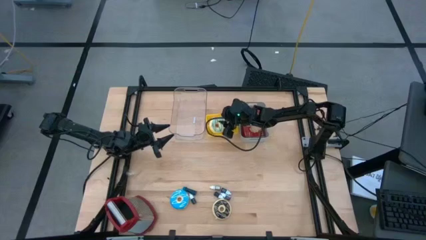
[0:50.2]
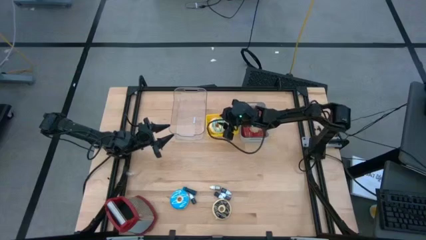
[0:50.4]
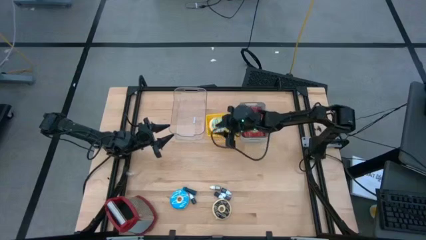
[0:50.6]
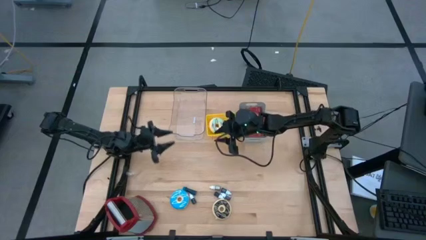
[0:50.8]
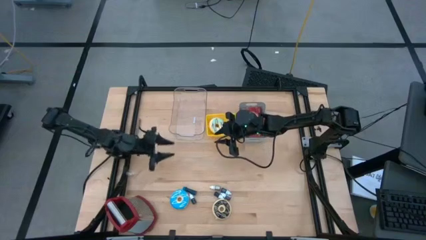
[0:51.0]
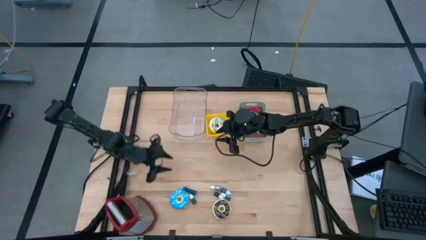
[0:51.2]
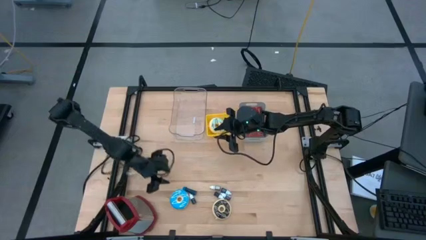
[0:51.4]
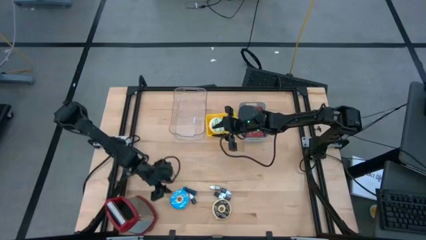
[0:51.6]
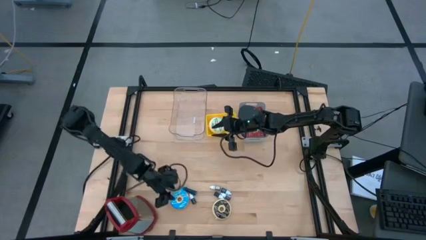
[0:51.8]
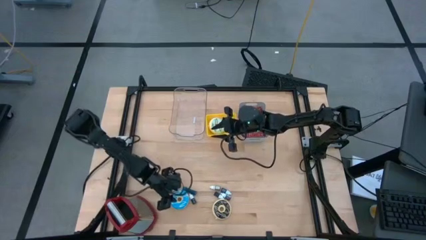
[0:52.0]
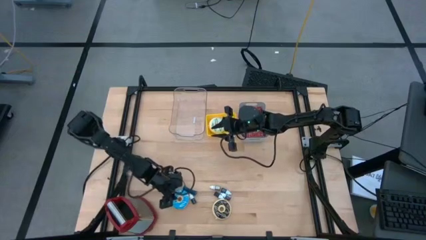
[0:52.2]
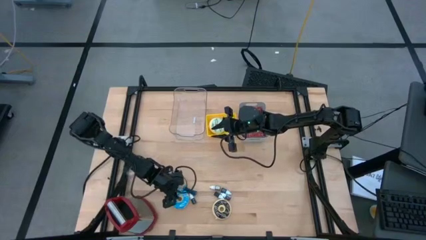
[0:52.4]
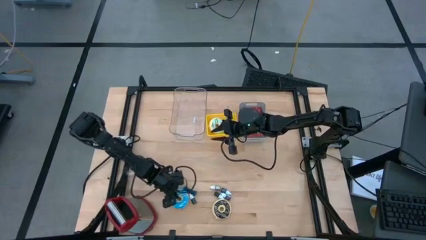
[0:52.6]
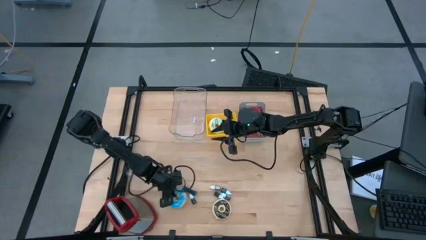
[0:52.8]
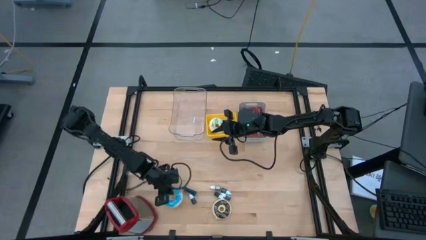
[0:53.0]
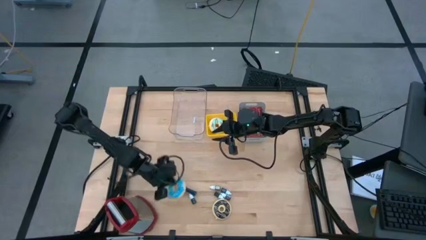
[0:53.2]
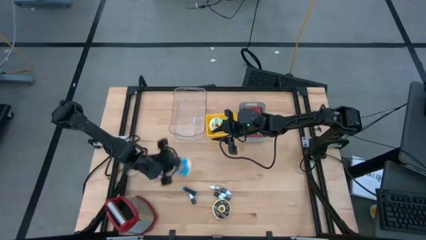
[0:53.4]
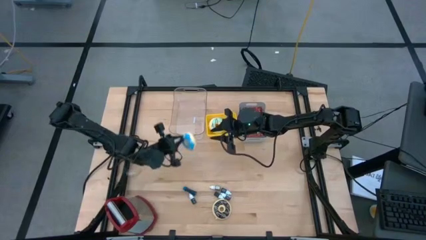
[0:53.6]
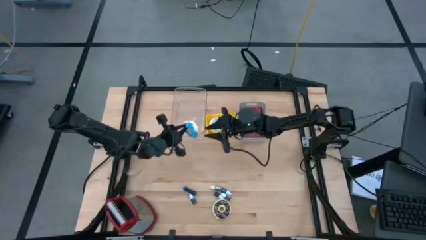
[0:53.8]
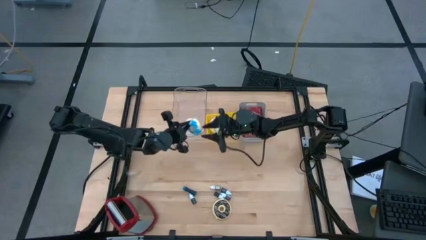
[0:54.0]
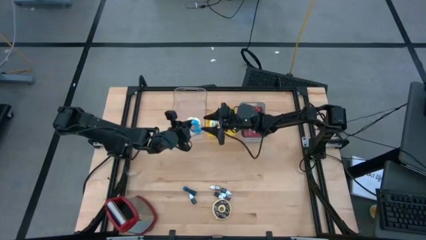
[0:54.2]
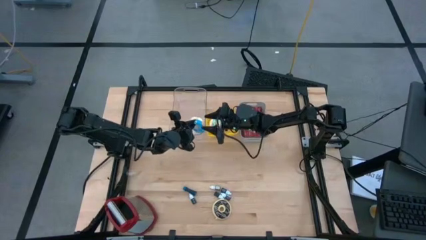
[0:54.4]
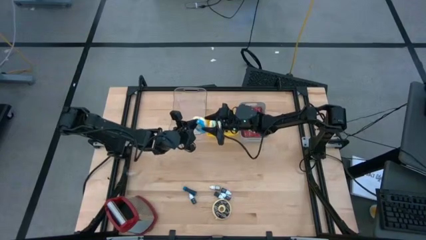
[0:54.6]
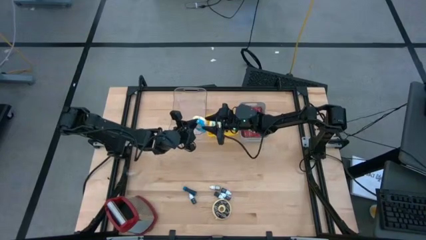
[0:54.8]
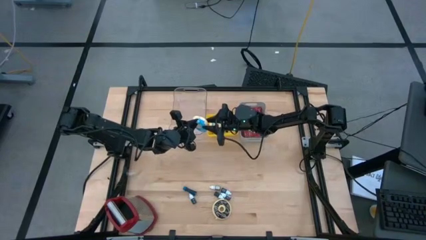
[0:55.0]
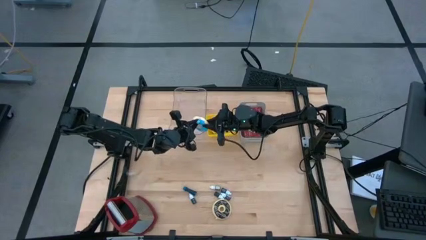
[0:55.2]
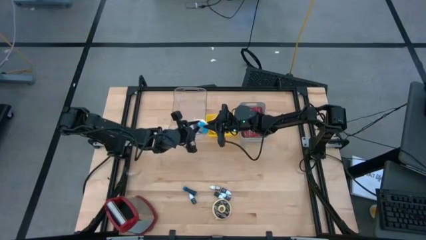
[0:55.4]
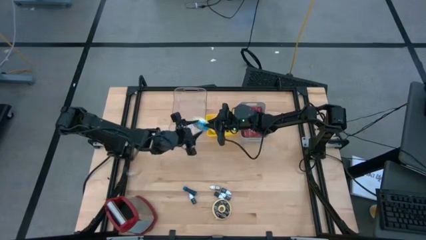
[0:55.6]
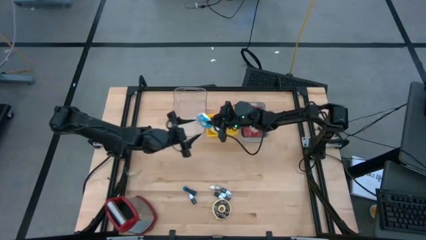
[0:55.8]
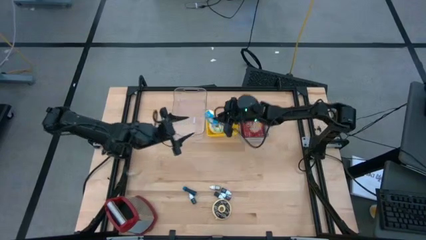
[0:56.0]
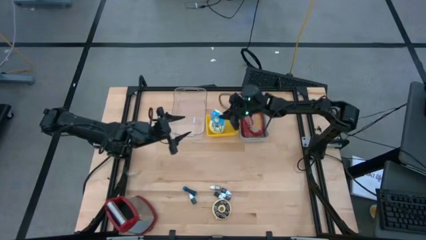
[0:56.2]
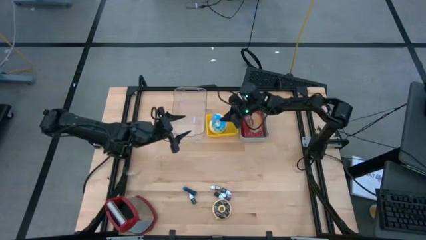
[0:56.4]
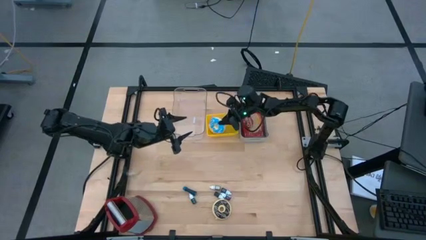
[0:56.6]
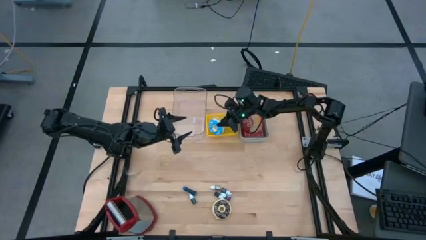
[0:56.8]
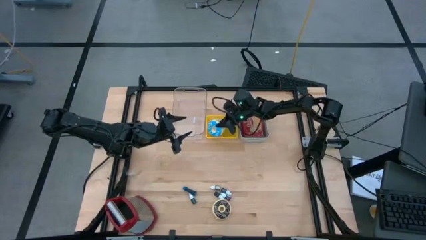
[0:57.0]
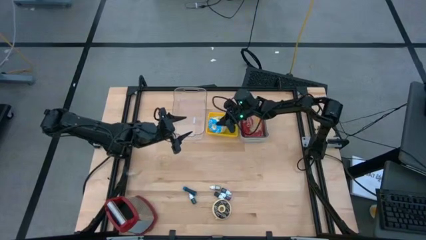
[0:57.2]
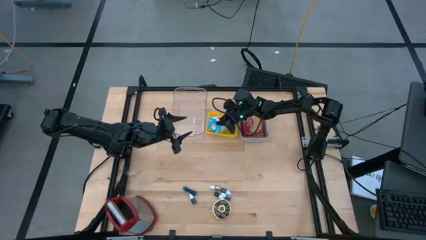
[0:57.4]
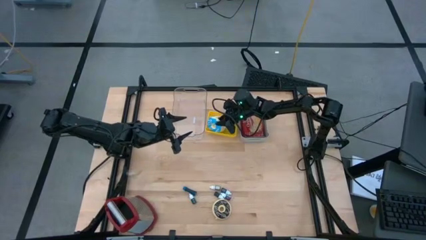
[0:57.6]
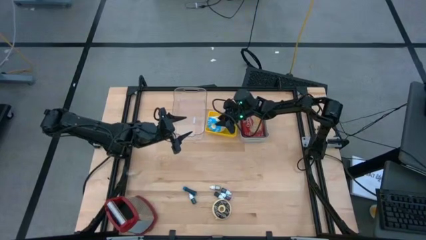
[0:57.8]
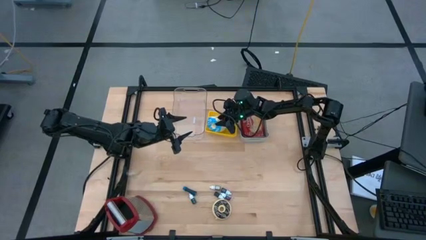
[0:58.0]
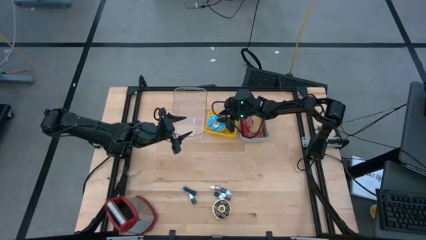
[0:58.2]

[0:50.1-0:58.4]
Put the blue donut into the yellow bin

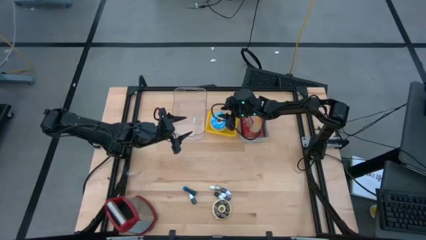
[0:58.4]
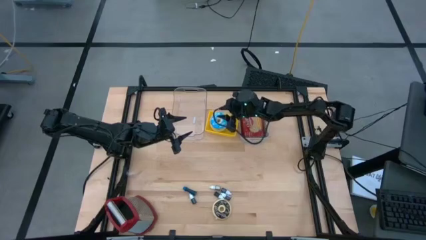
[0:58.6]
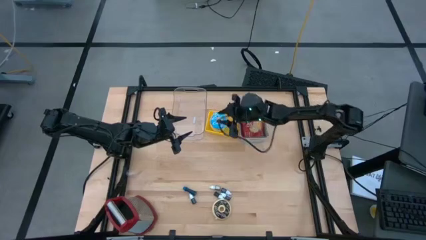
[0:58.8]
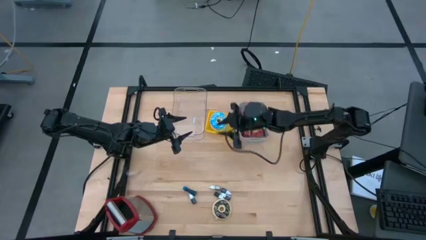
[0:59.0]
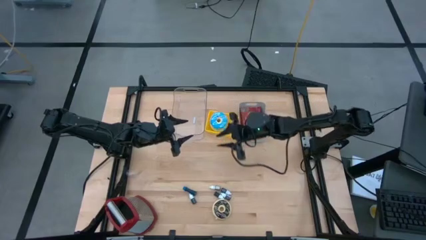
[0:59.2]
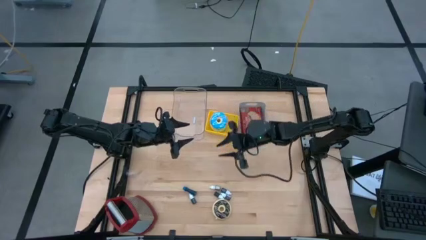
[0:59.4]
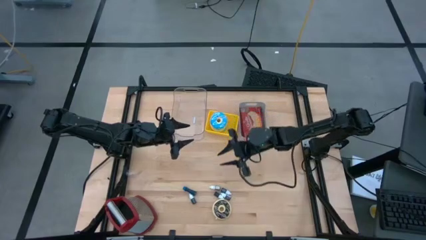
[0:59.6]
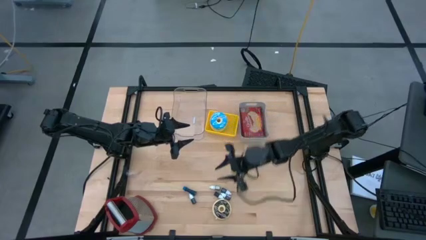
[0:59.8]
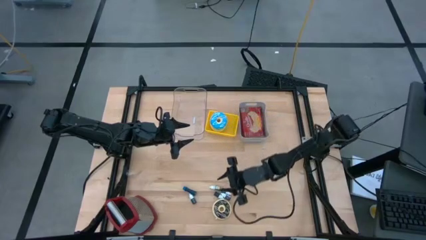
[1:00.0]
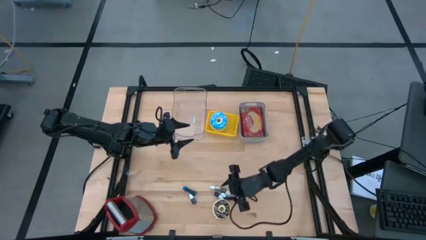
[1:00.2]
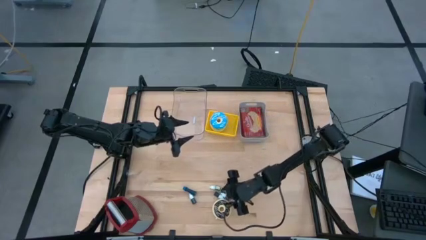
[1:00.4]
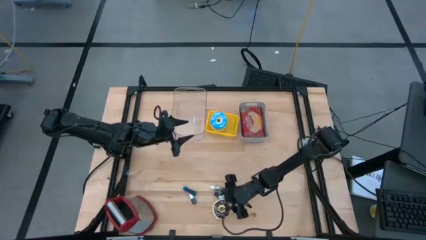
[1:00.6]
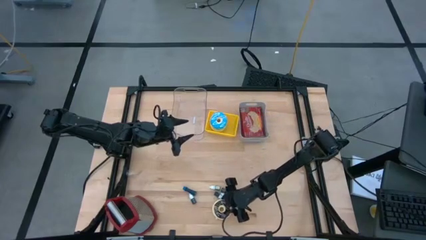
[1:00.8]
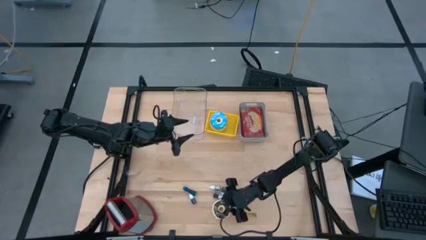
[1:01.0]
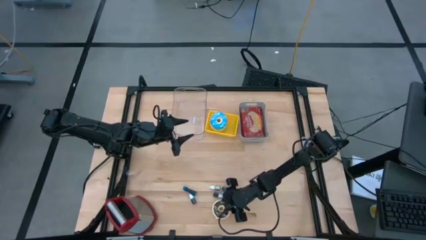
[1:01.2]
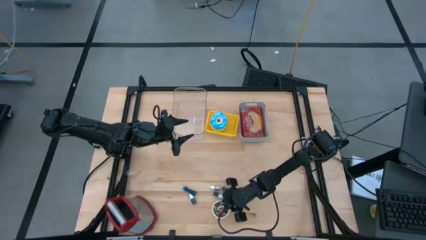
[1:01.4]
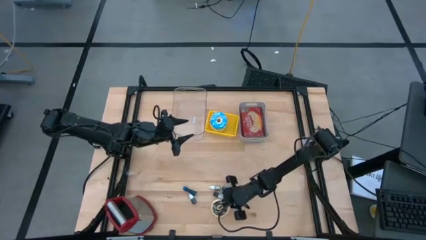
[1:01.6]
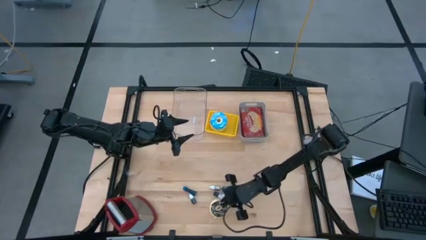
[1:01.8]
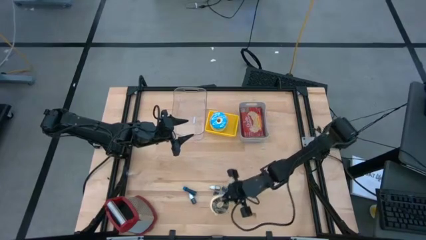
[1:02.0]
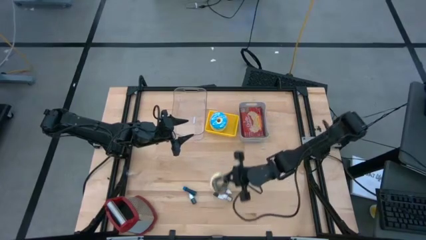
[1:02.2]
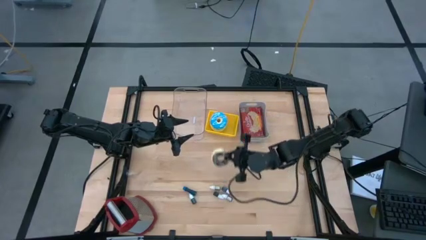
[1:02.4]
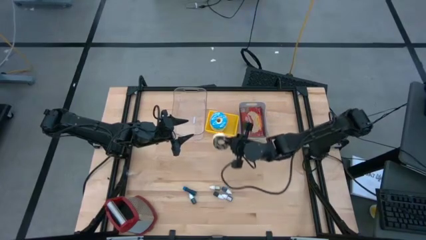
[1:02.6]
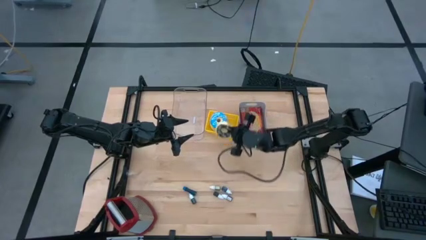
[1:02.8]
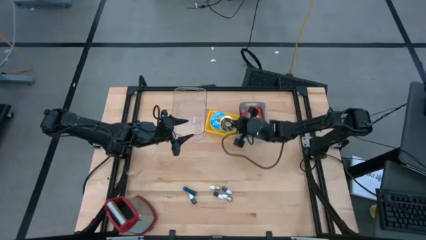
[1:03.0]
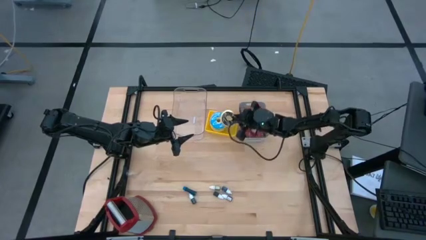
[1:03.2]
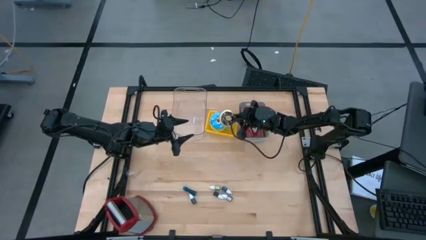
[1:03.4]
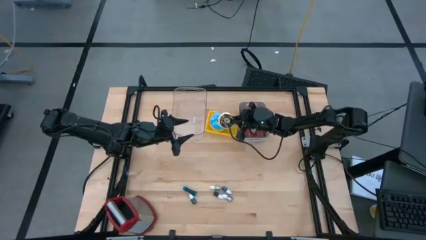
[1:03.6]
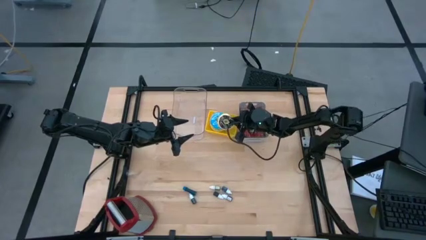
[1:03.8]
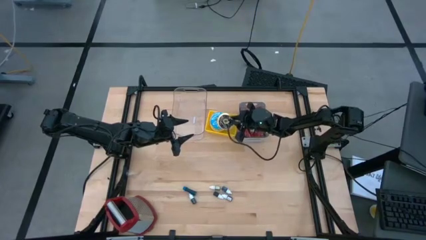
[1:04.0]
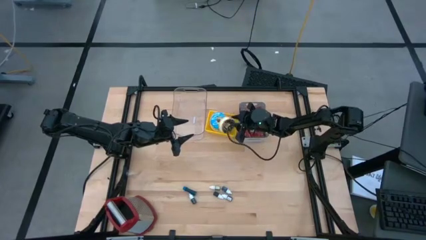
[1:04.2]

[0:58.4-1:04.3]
Put the black donut into the yellow bin
